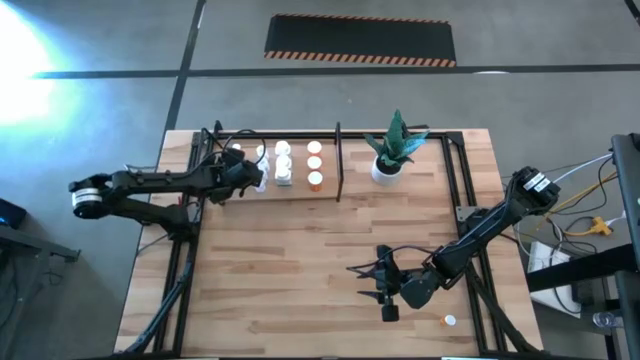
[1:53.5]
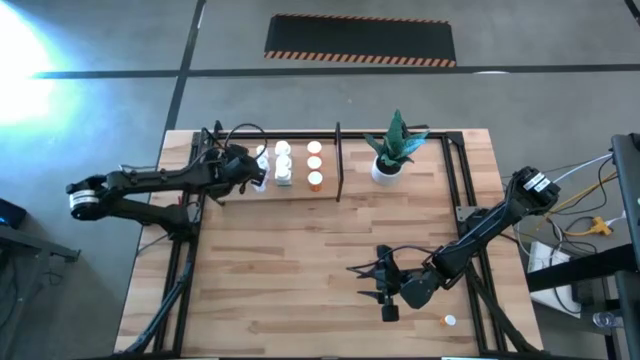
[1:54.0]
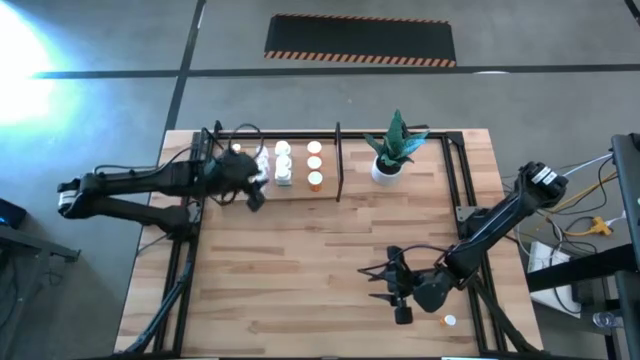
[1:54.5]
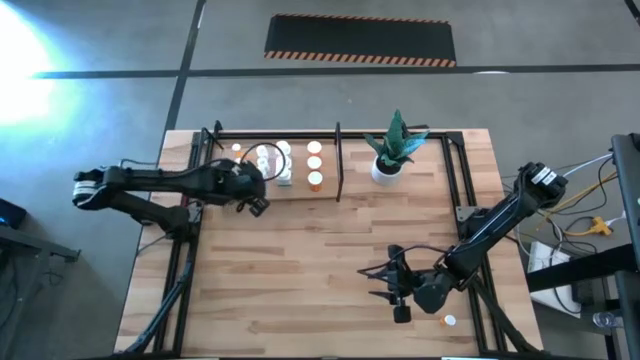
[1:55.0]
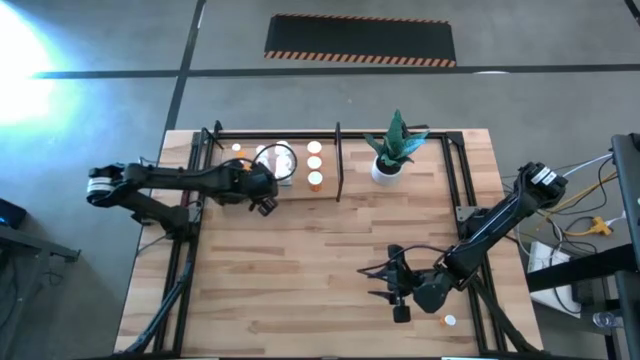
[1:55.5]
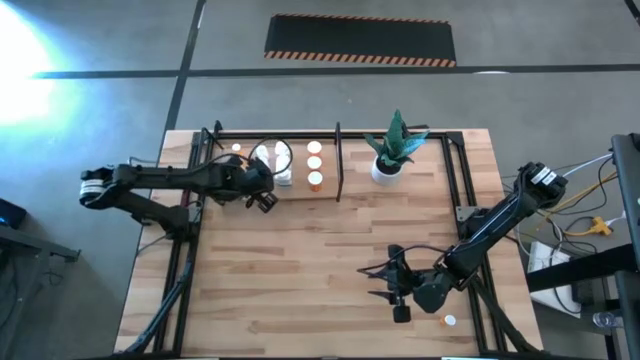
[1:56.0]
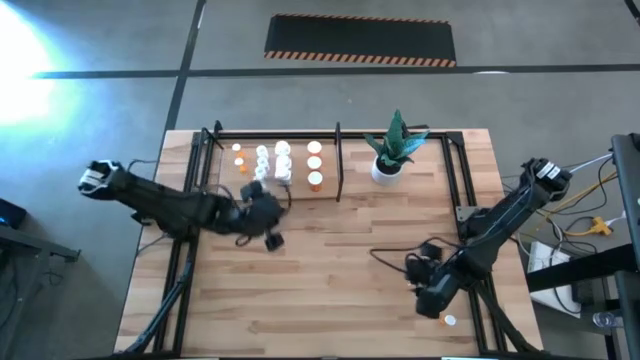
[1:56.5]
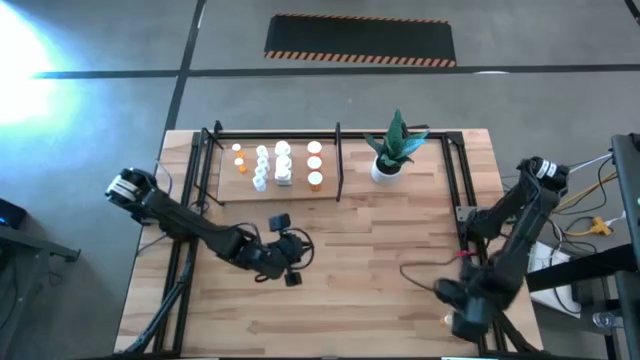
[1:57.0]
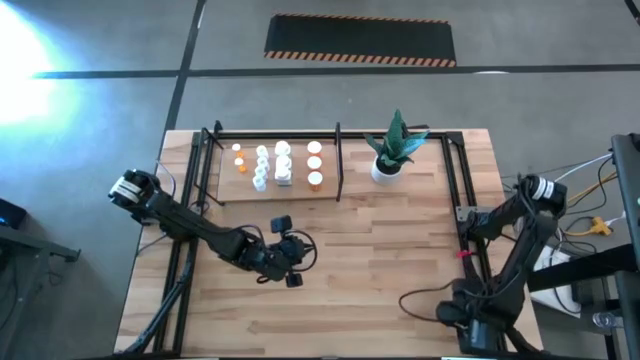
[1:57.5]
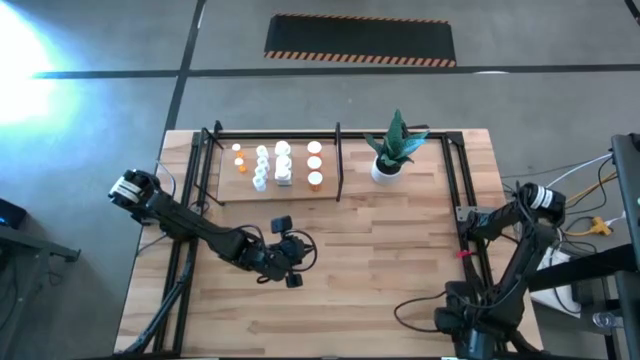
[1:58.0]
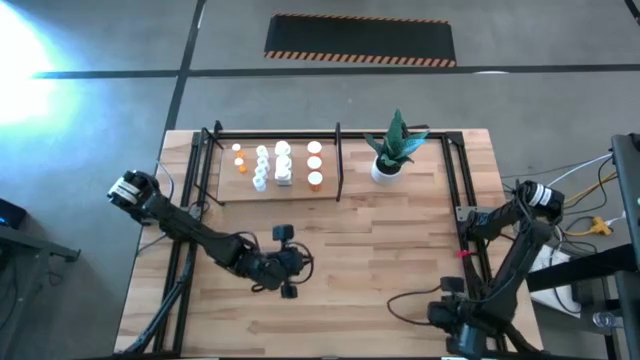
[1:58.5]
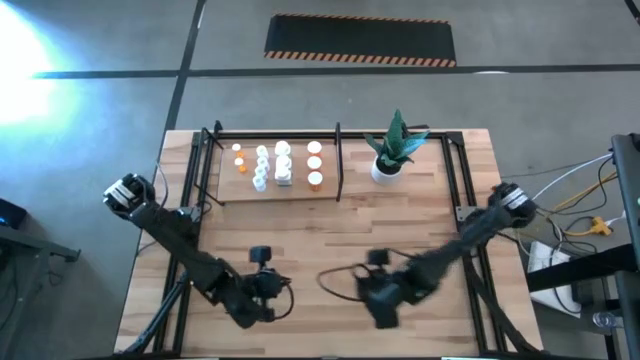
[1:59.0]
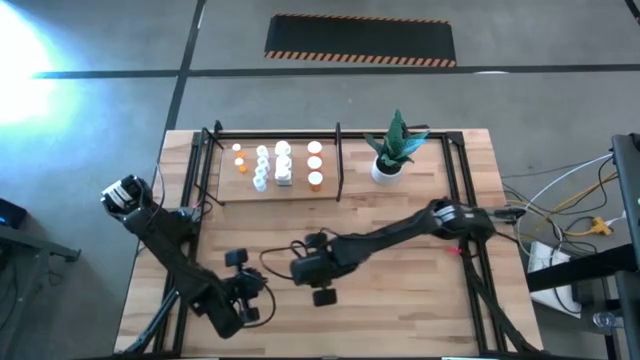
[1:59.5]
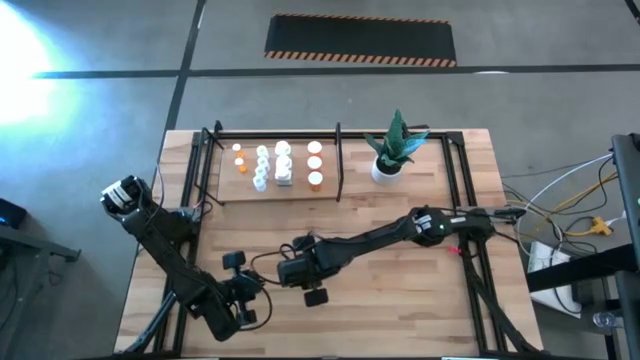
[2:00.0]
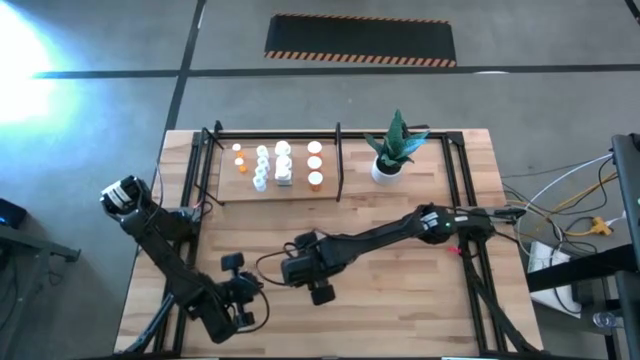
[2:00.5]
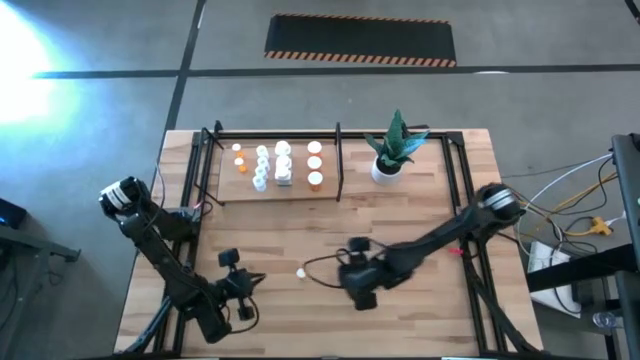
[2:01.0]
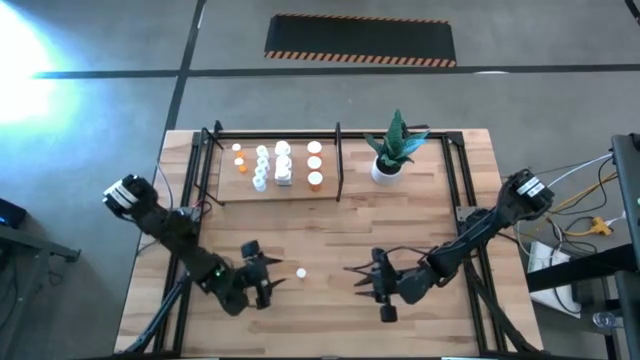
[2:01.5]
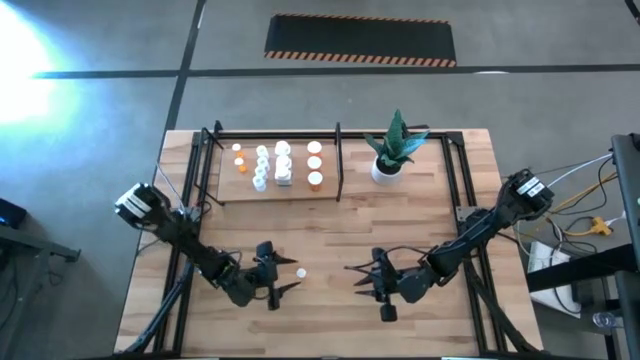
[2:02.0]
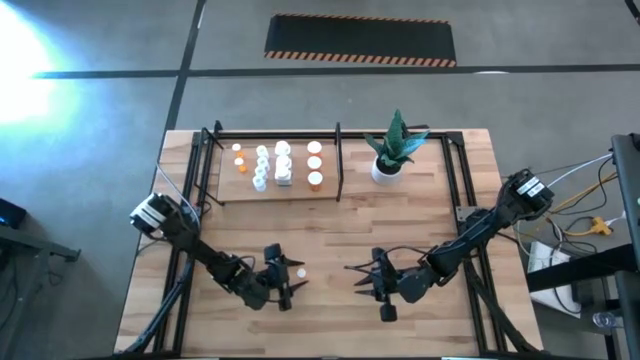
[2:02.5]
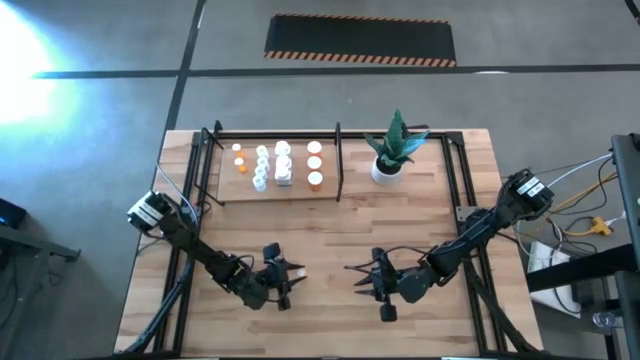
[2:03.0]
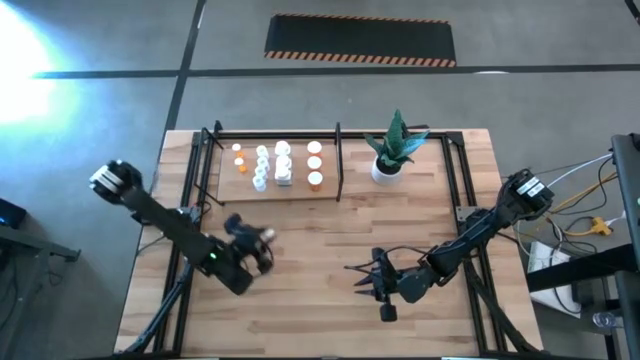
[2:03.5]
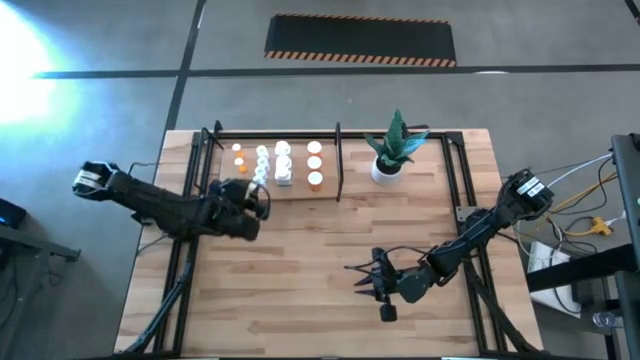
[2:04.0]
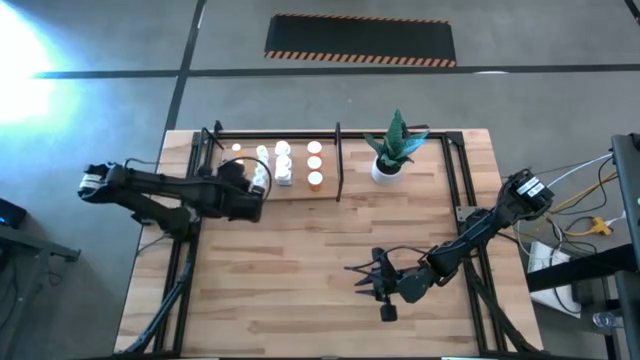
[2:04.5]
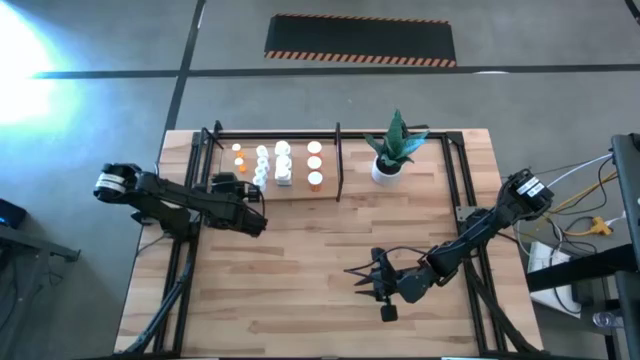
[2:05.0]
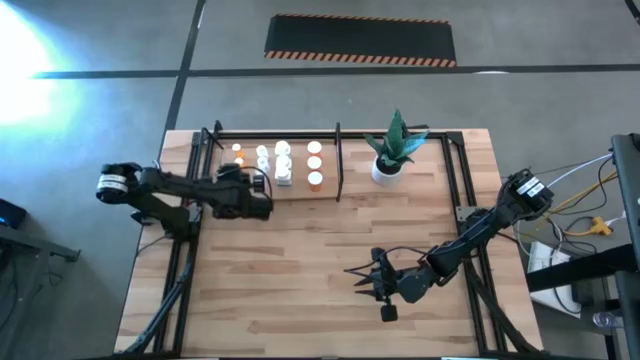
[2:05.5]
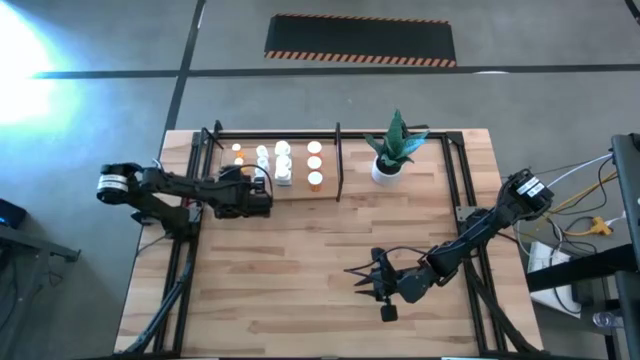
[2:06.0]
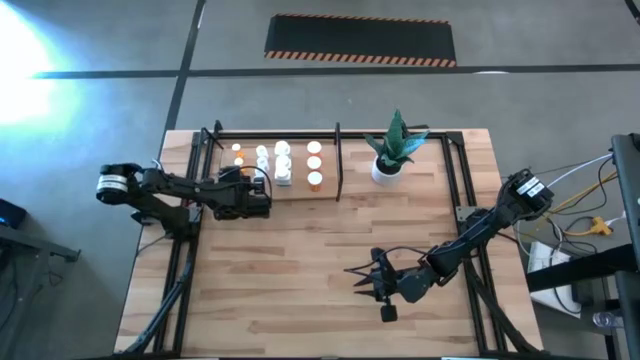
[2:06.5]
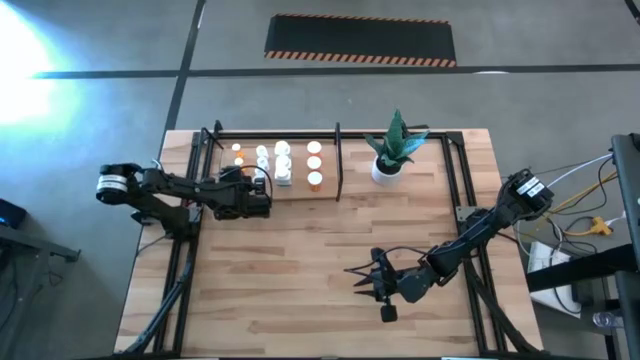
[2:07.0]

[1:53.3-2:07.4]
Task: Pick and place medicine bottles onto shelf by color
Put the small orange medicine container on the shelf

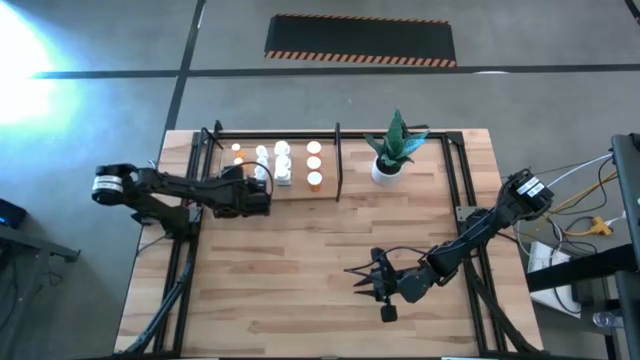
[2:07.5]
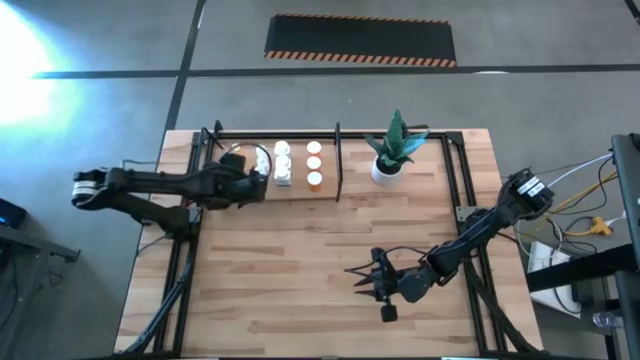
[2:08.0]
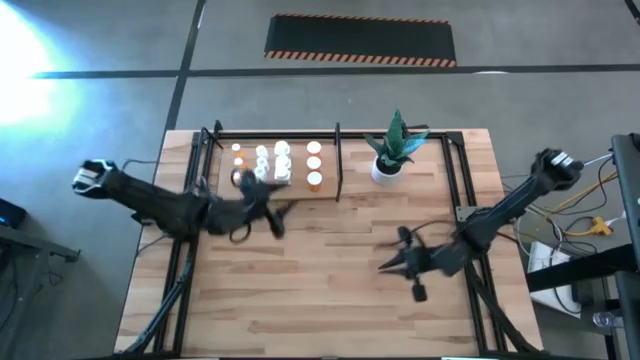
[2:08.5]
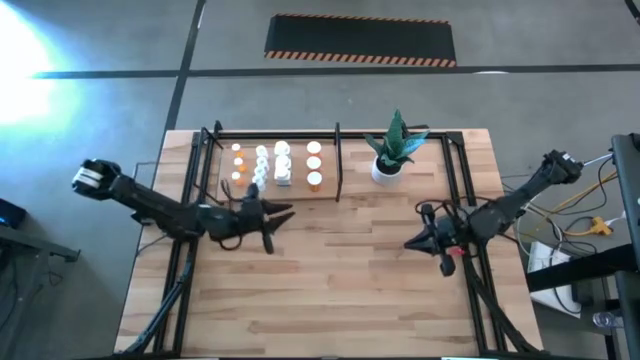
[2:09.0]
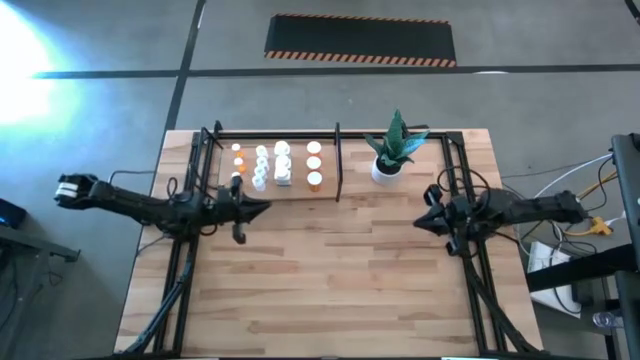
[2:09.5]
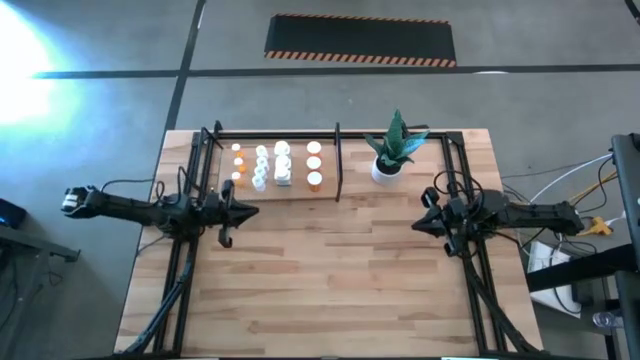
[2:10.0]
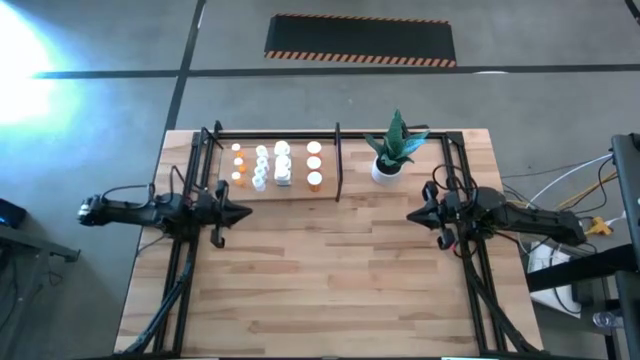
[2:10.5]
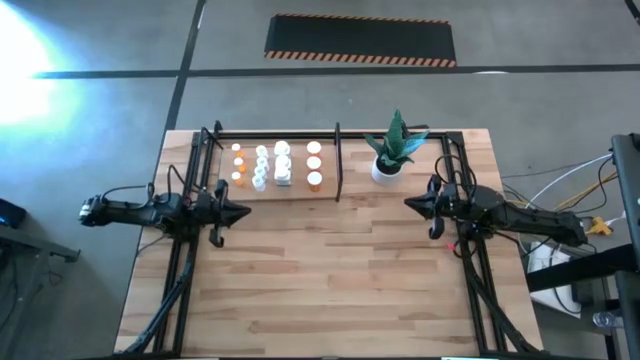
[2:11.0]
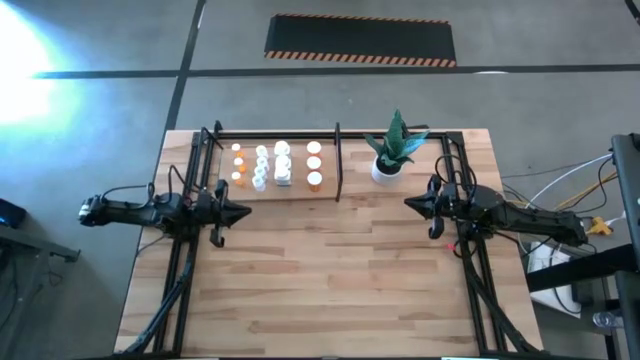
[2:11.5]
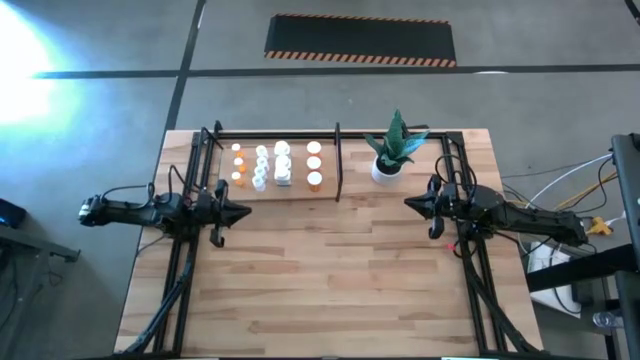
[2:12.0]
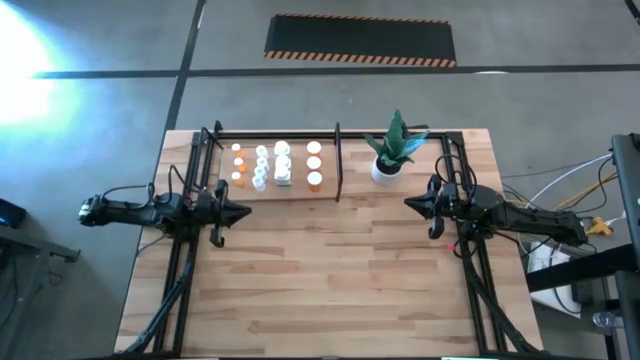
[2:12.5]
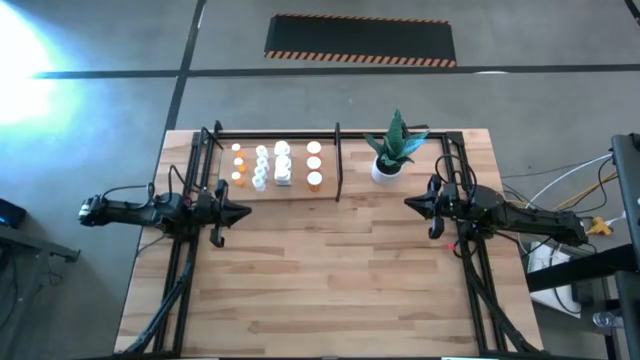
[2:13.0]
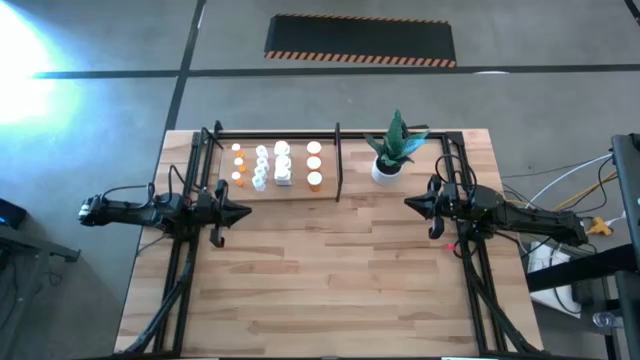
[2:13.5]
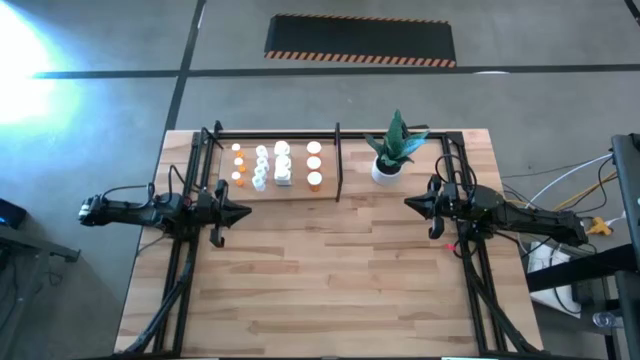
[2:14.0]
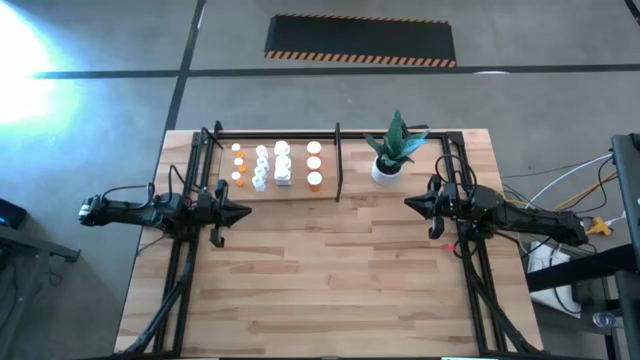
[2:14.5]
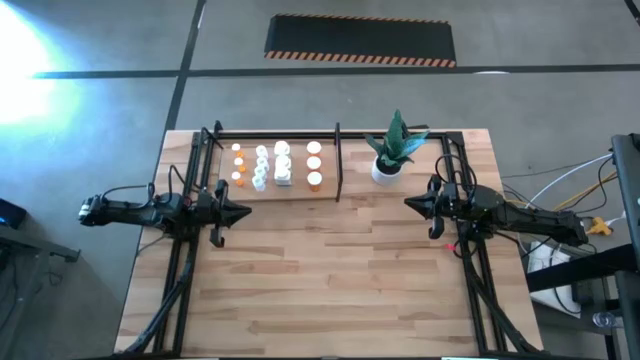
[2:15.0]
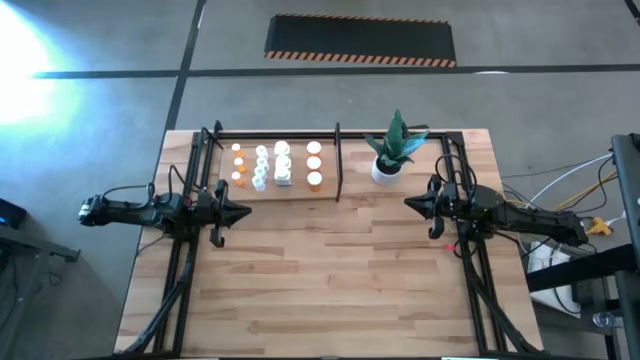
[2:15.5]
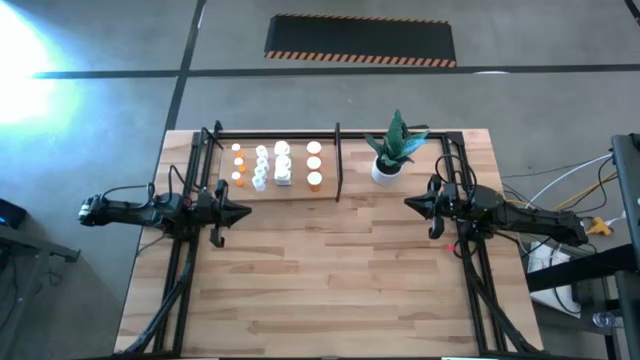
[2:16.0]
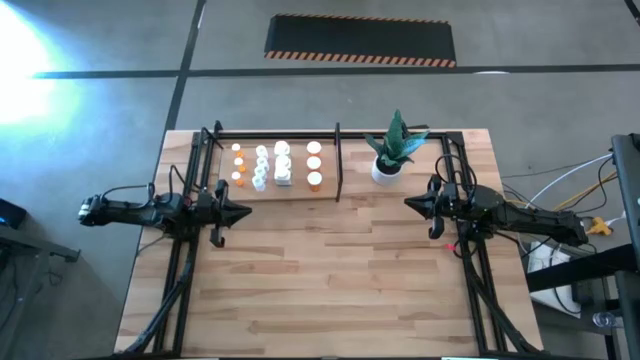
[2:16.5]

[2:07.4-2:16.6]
Return to Home Position
